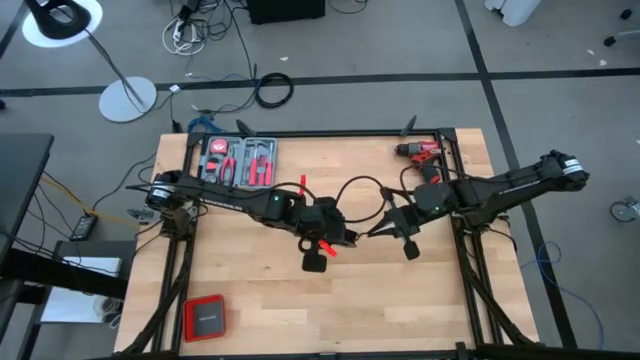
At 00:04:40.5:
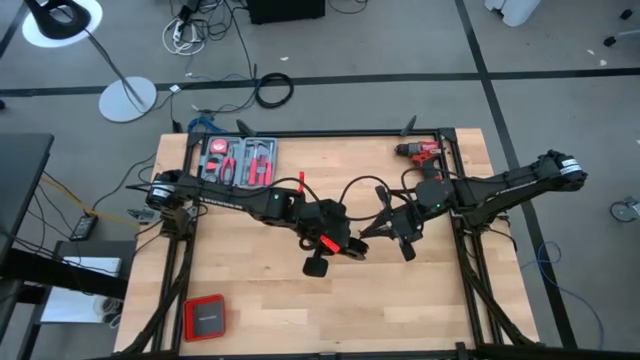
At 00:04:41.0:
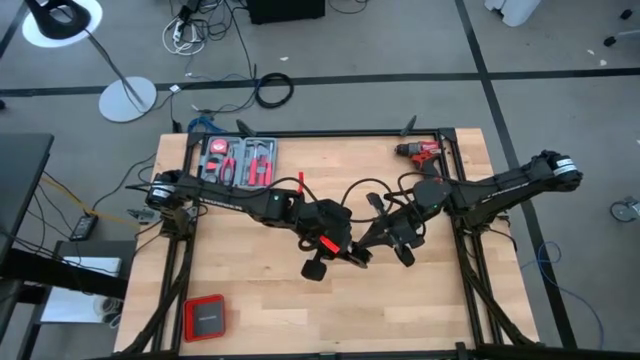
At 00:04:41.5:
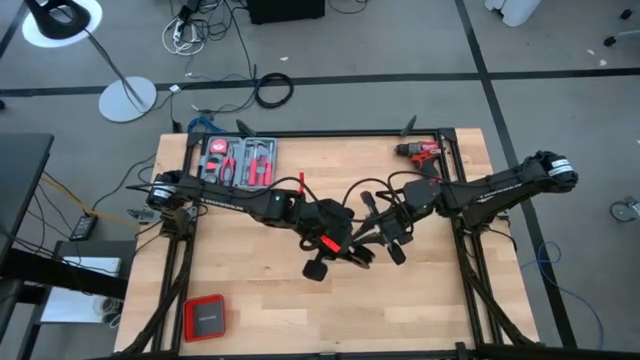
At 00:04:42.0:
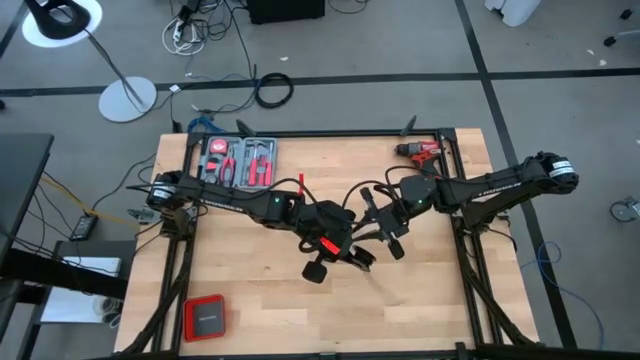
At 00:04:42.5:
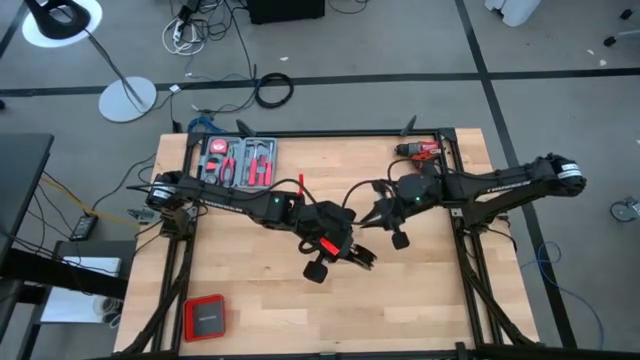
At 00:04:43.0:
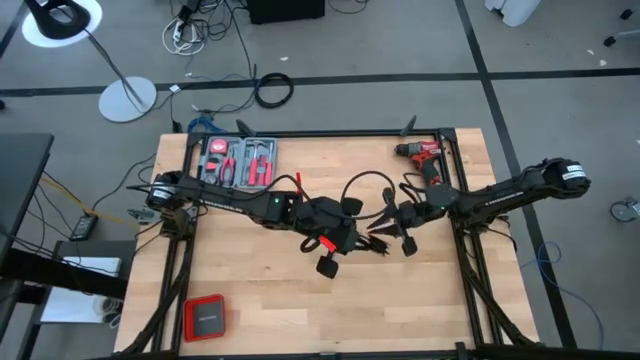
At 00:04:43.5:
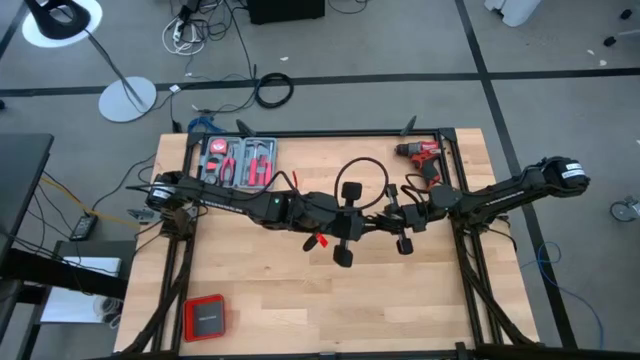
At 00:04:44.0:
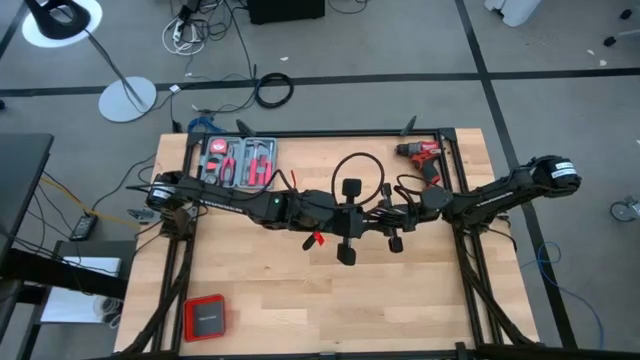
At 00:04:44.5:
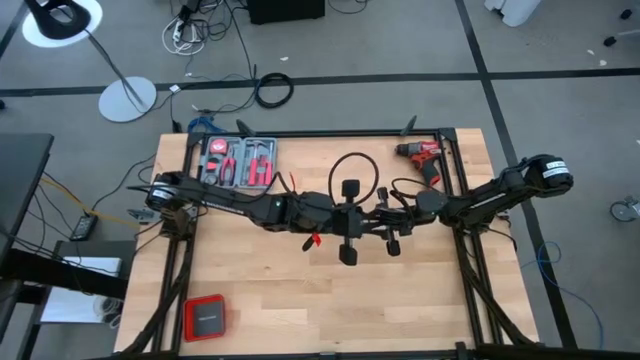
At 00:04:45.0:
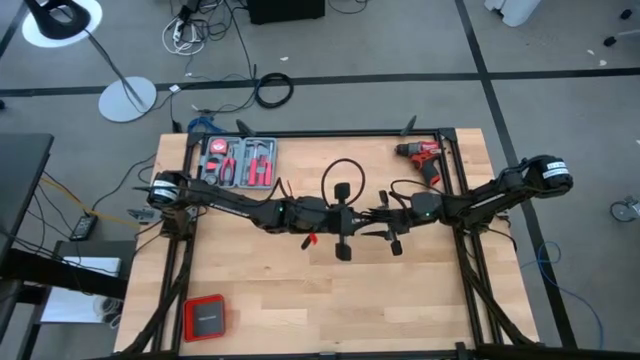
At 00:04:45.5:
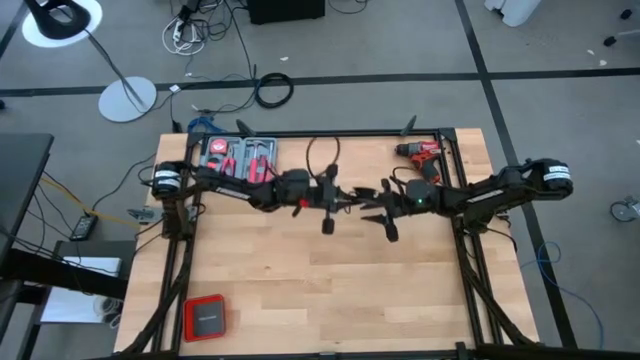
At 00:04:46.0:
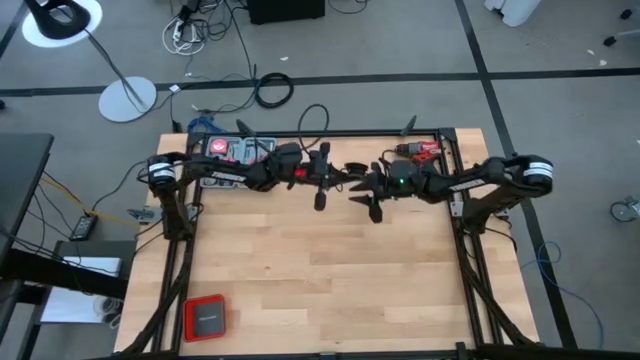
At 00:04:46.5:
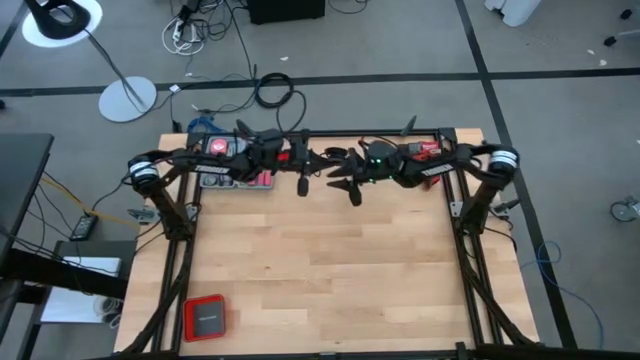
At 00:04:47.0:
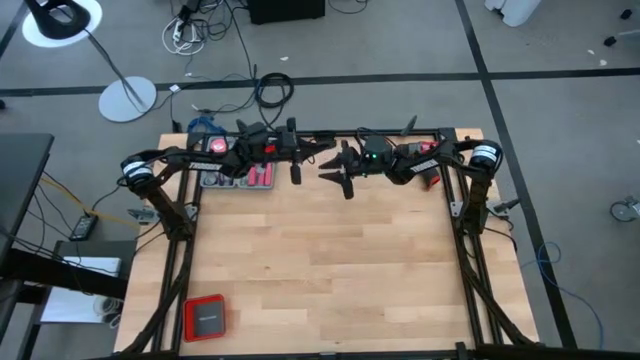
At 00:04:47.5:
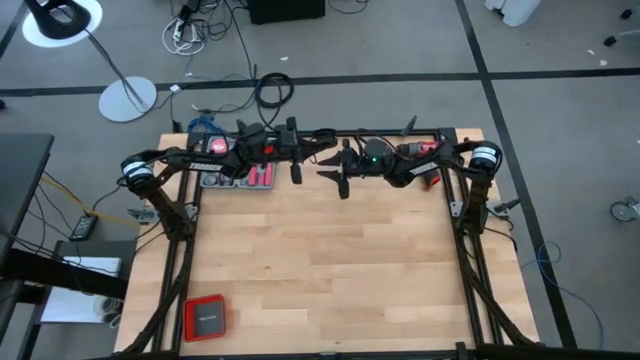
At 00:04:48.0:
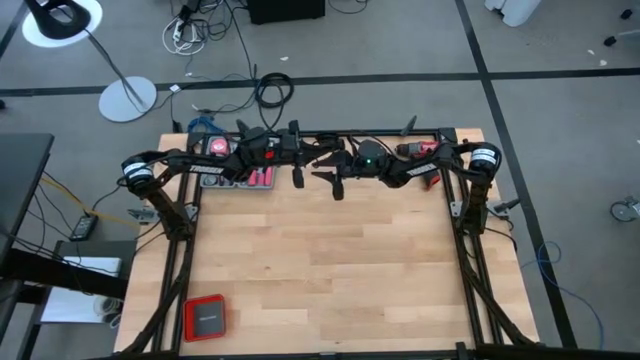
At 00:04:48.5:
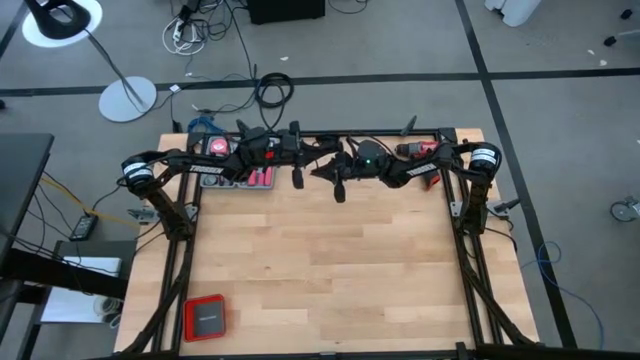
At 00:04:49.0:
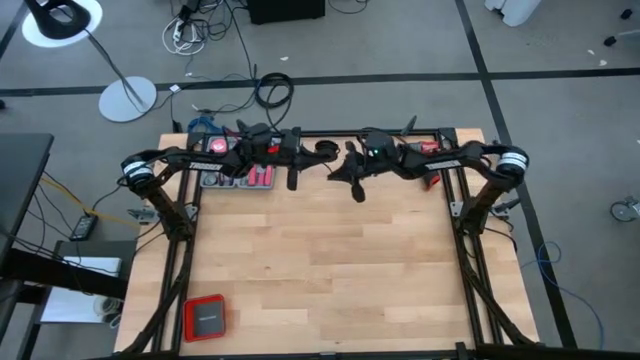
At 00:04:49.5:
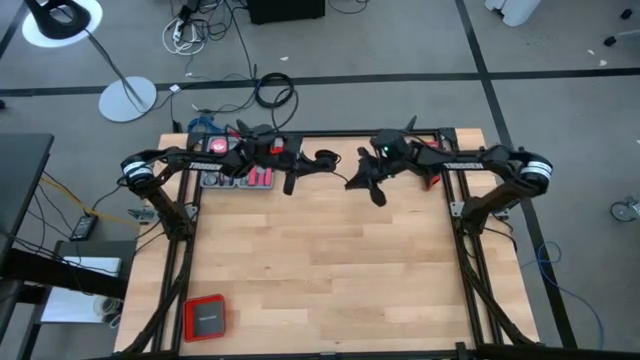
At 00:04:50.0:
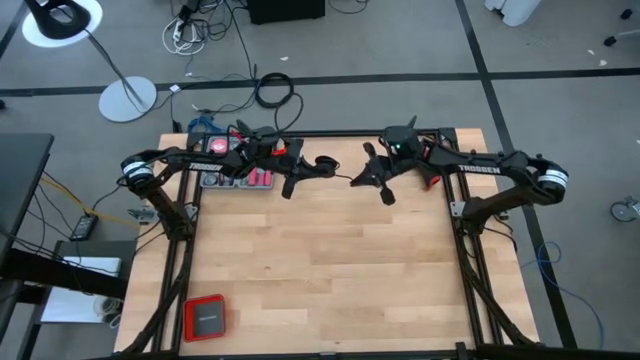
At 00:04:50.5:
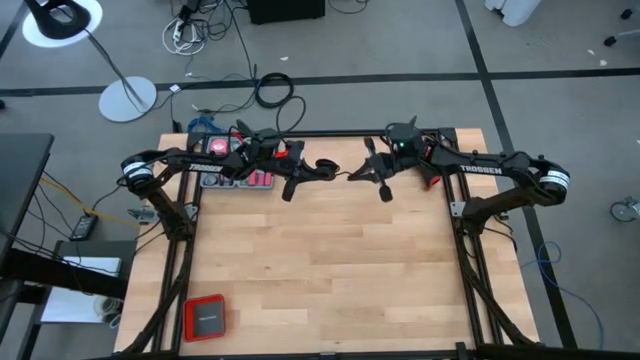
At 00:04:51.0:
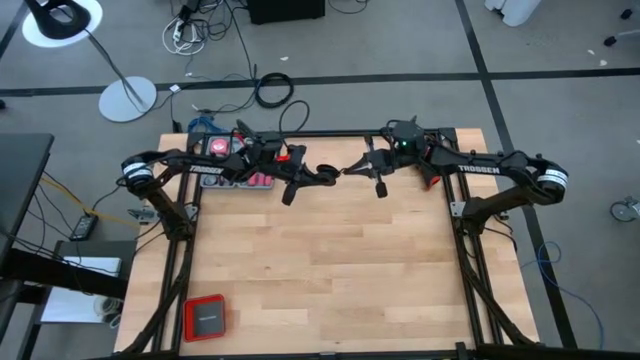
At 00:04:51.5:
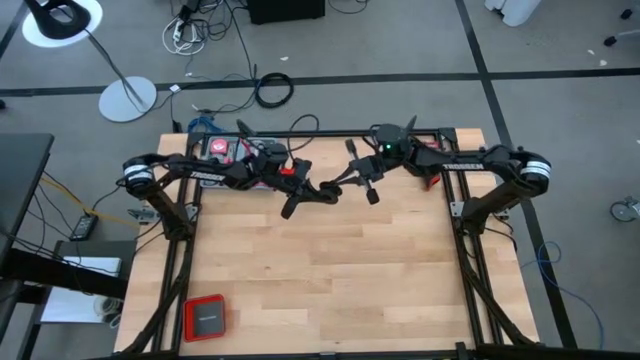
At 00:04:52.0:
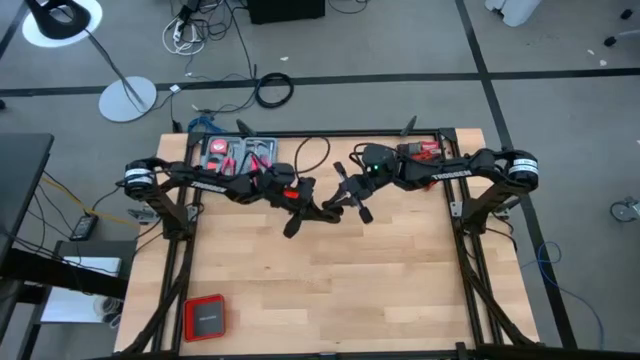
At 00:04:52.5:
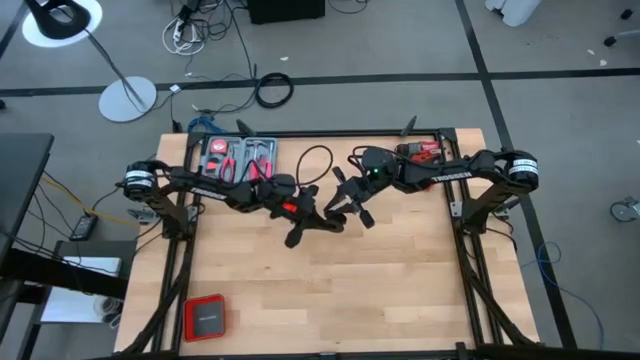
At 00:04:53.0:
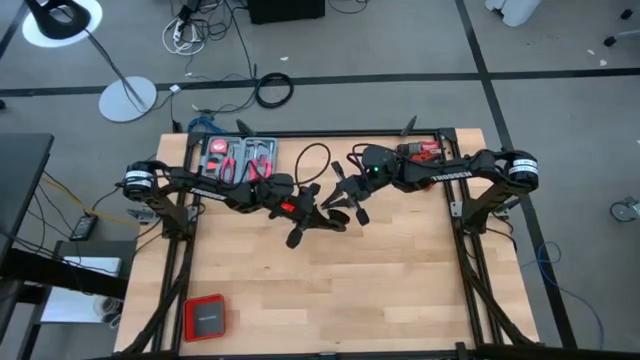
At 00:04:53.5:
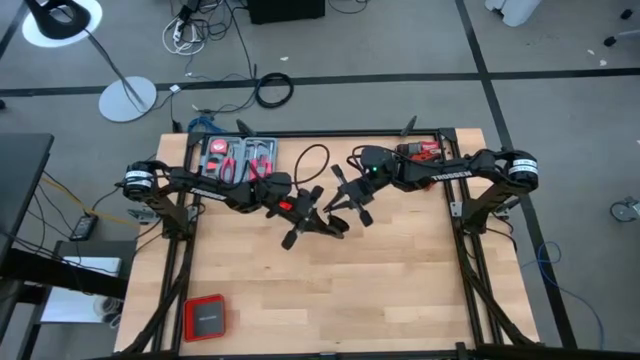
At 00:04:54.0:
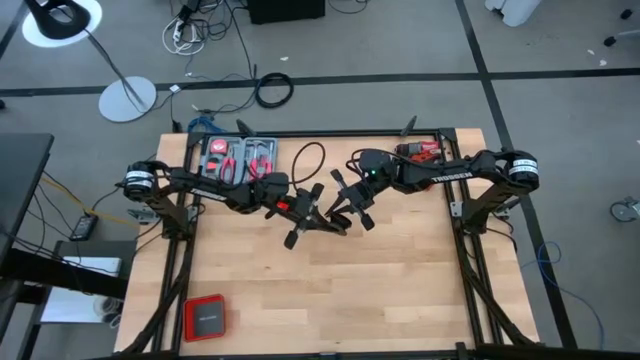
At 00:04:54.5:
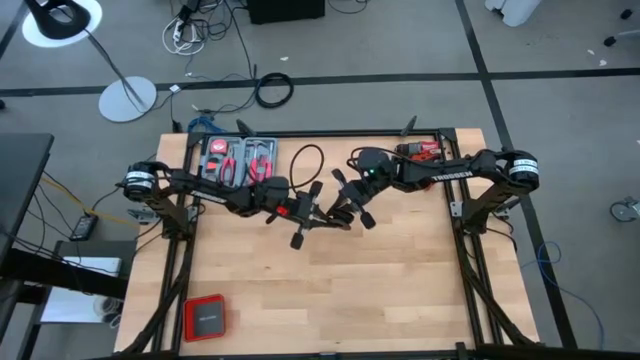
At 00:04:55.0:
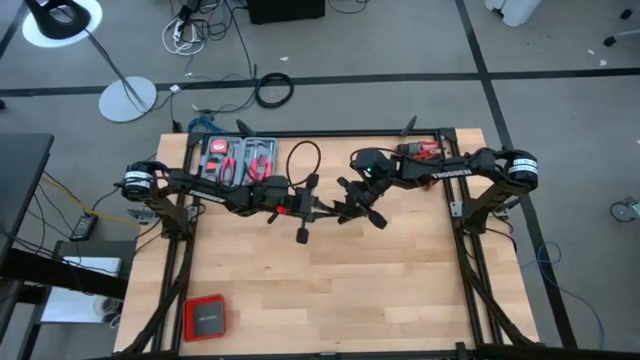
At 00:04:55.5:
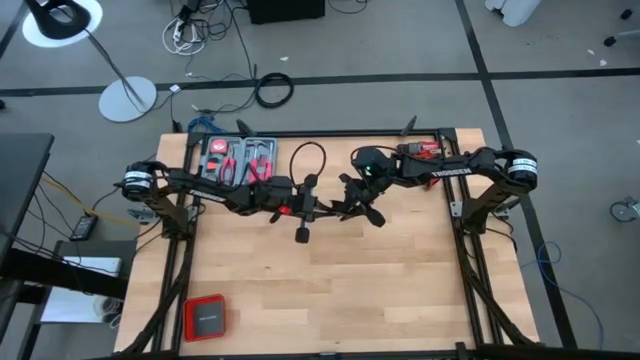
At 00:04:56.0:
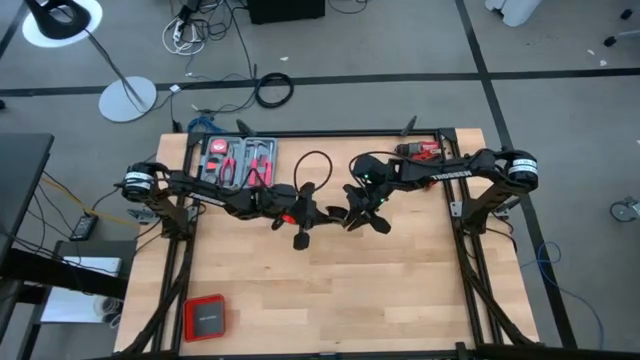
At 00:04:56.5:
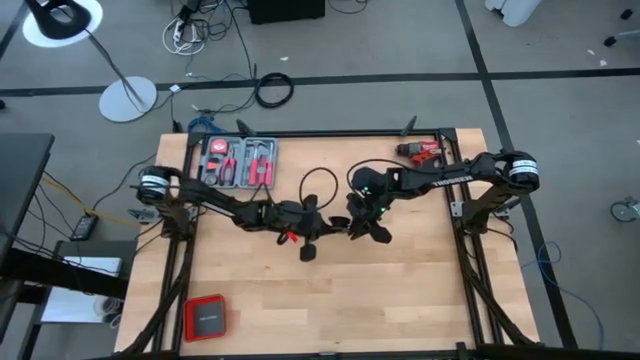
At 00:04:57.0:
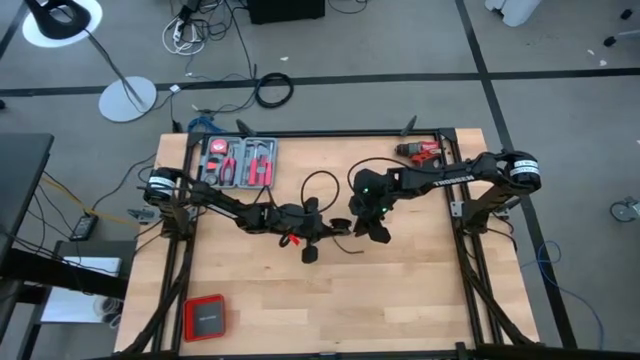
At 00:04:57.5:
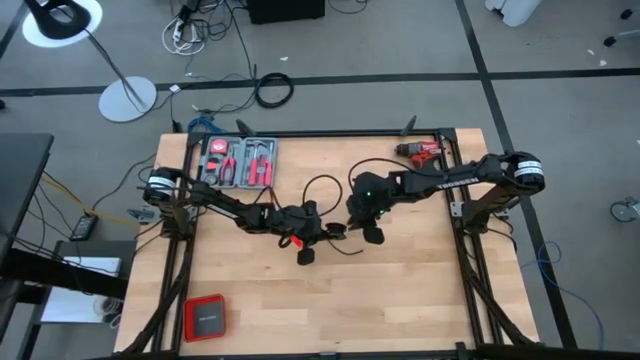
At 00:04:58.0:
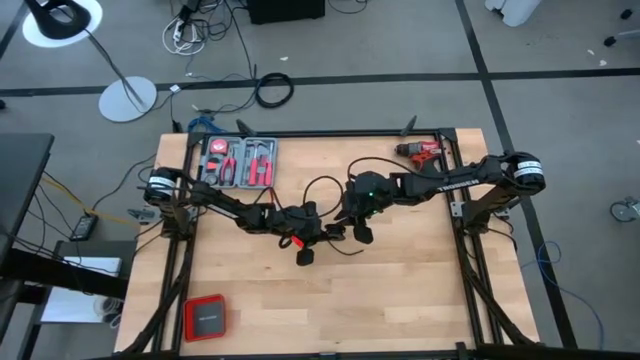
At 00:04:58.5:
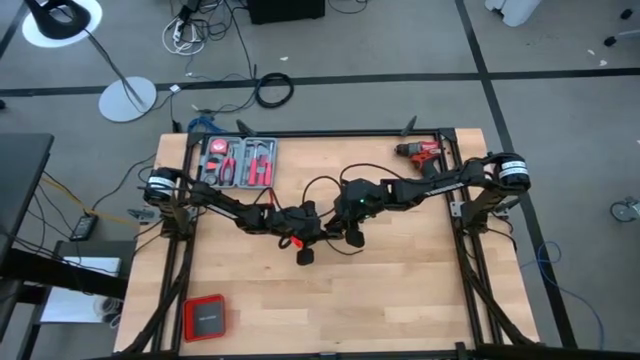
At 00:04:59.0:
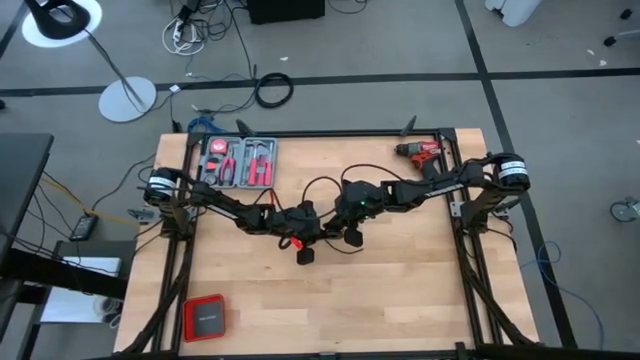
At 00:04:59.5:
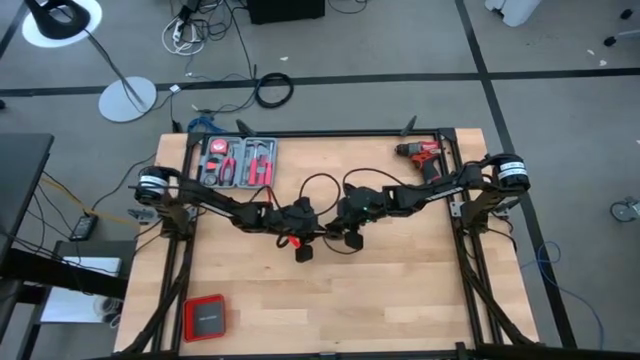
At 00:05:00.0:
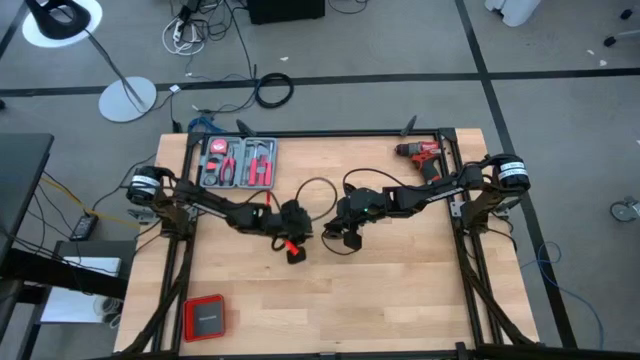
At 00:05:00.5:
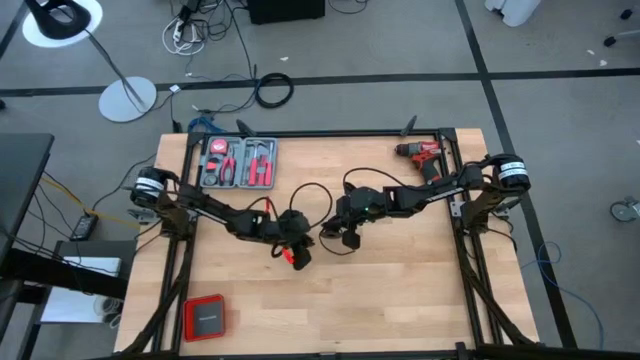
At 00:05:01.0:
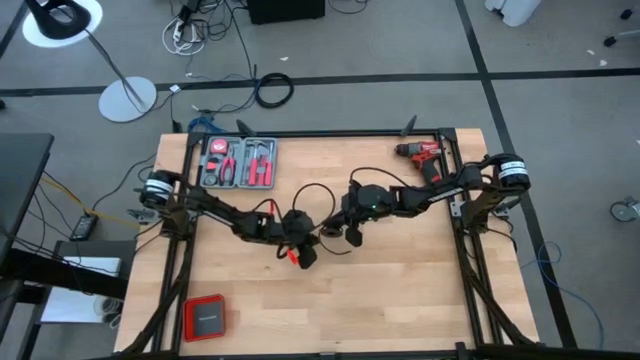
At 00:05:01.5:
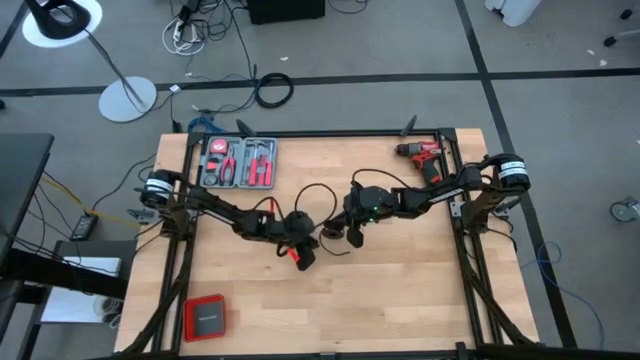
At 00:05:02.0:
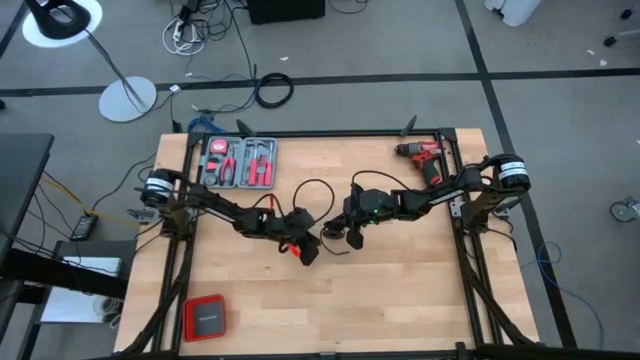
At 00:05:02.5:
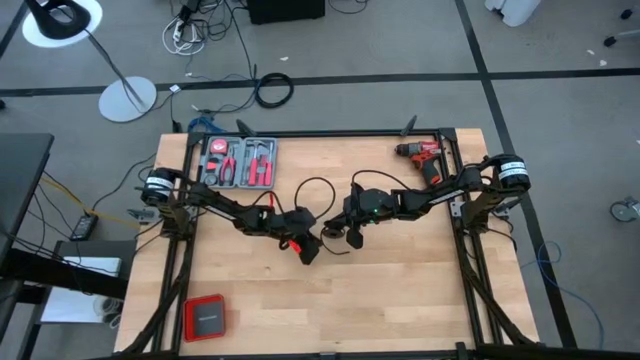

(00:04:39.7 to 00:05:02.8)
Task: Coil cords
Coil the black wire on the spool
